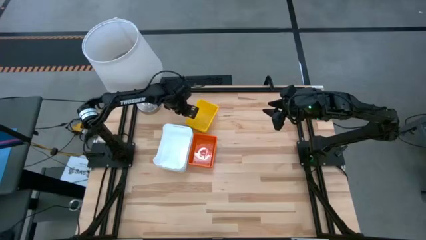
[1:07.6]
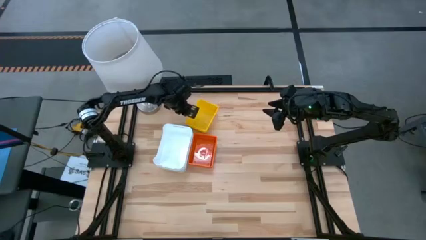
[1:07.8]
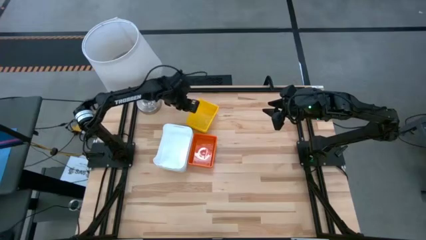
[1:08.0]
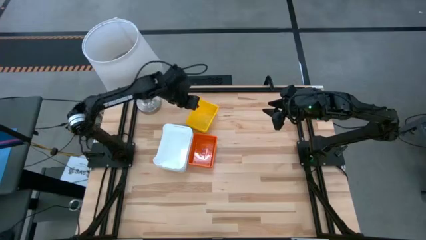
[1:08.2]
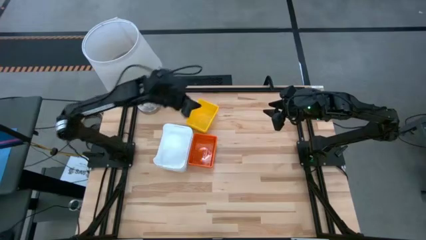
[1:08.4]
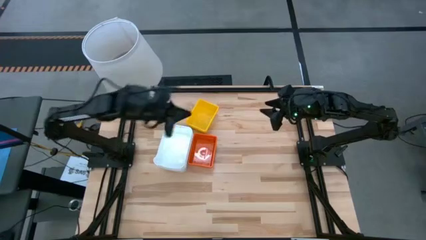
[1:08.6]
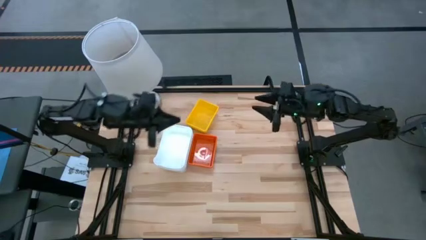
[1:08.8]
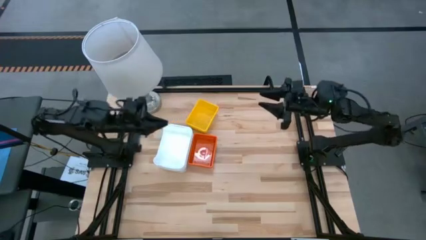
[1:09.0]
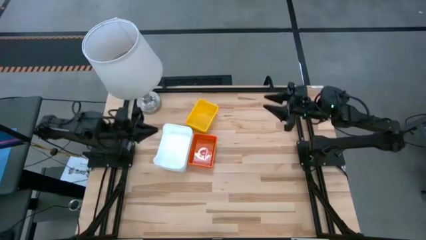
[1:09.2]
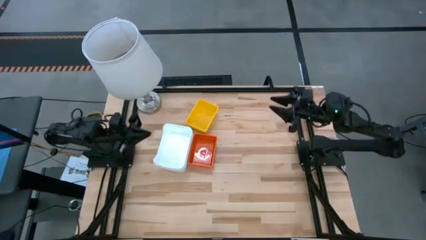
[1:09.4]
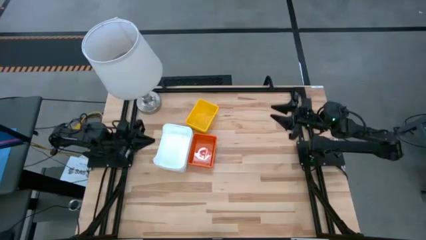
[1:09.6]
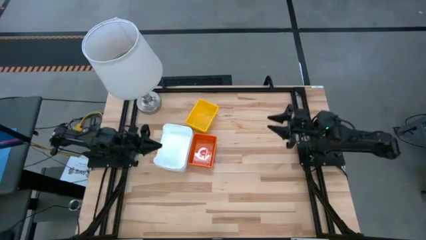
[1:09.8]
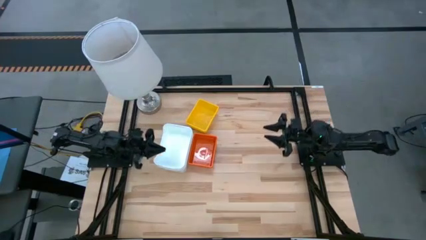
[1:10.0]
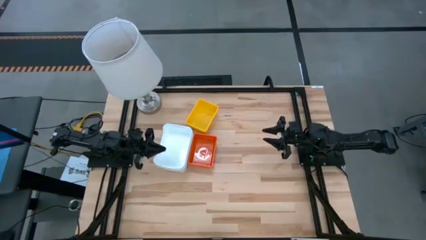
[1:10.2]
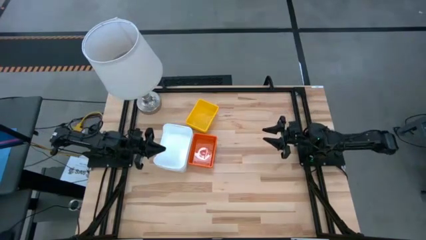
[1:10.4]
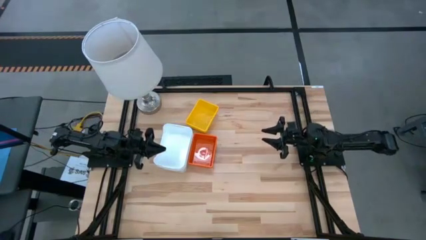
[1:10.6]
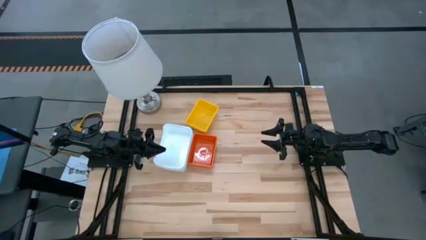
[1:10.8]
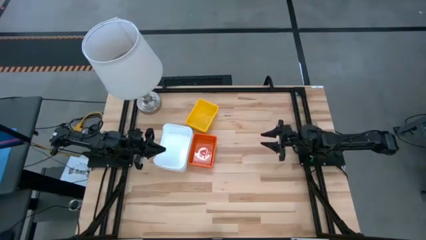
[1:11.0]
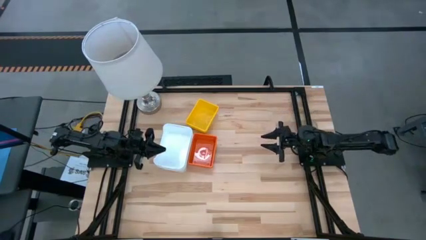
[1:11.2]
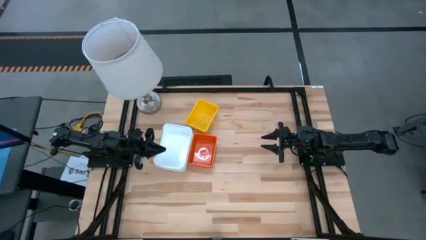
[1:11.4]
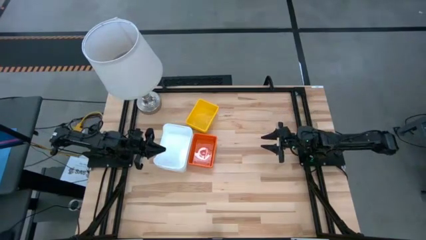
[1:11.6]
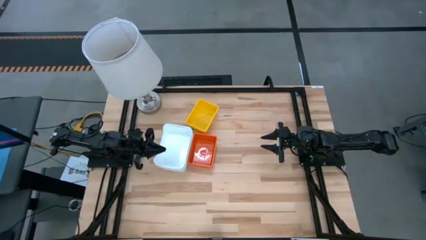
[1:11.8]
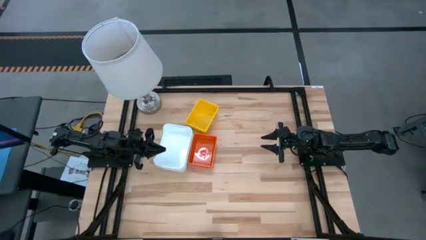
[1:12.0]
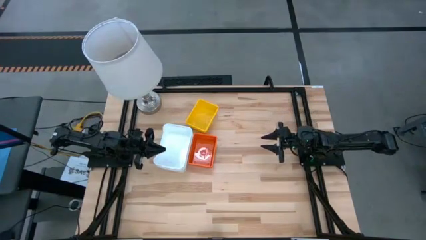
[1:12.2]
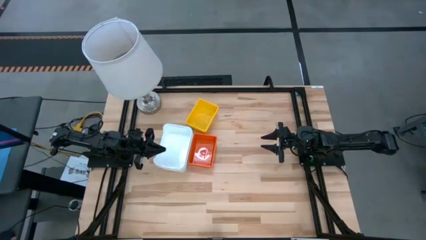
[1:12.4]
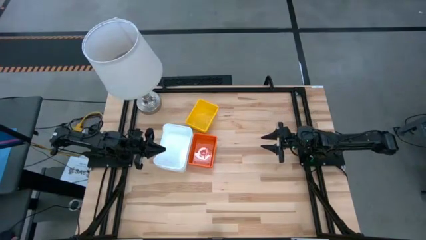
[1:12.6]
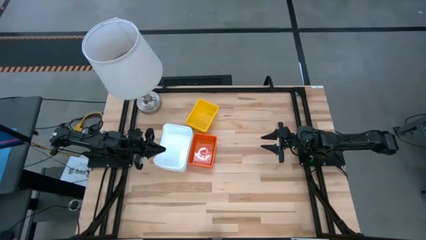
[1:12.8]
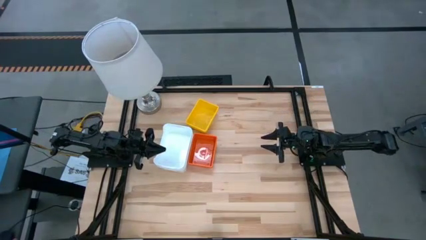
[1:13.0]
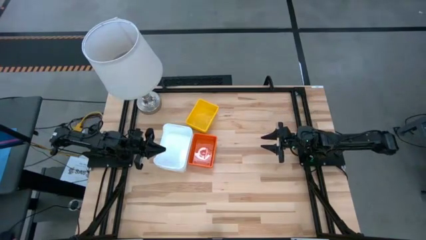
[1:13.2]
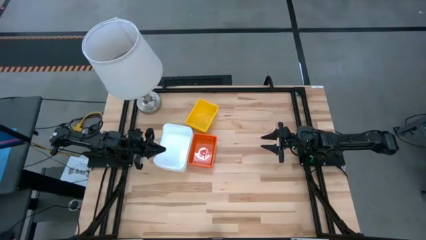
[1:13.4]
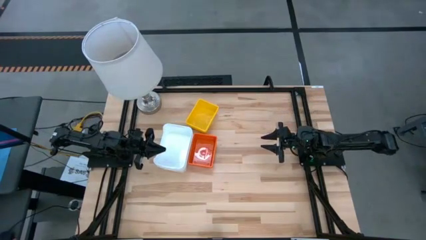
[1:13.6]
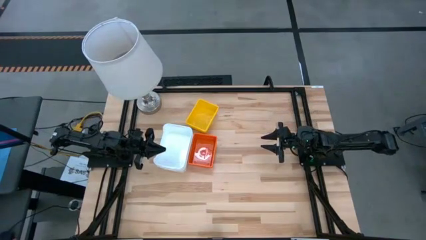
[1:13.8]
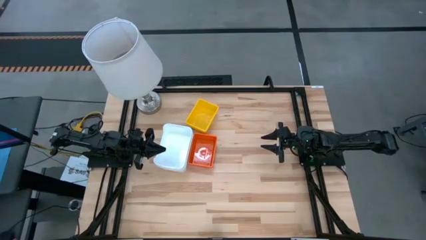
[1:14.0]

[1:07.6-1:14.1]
Return to Home Position
